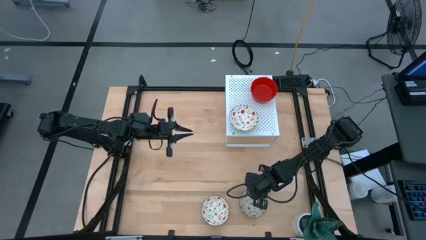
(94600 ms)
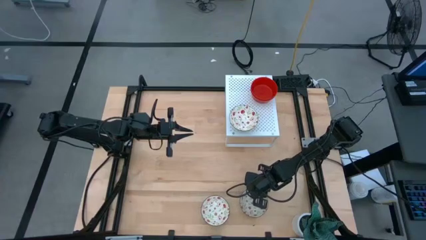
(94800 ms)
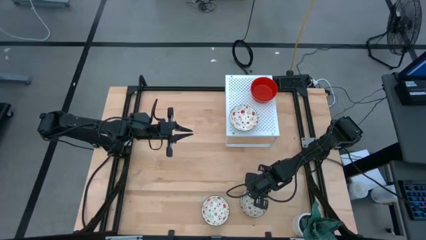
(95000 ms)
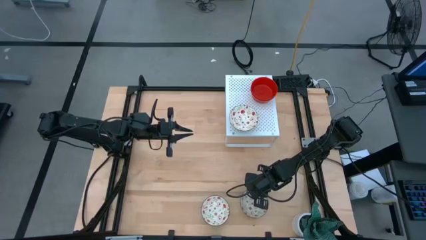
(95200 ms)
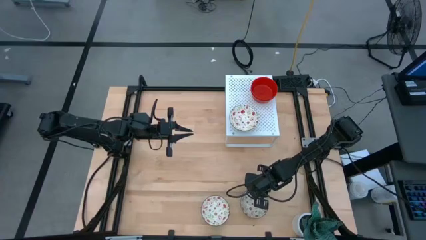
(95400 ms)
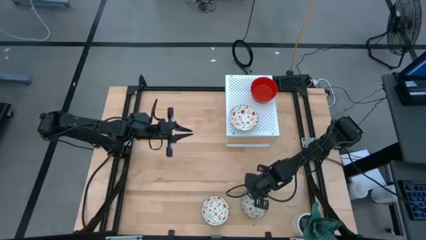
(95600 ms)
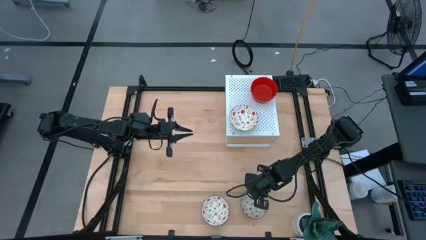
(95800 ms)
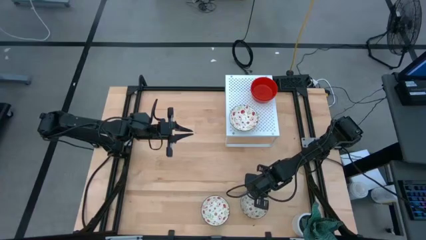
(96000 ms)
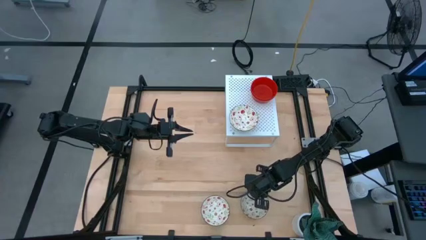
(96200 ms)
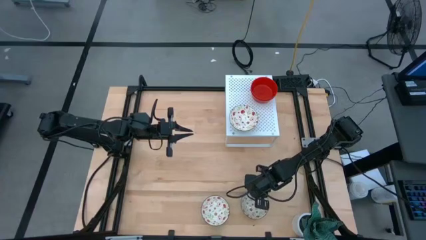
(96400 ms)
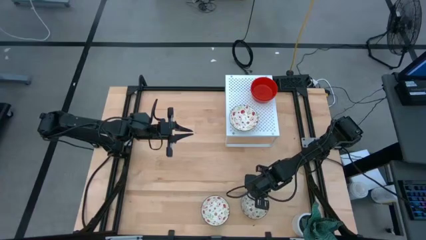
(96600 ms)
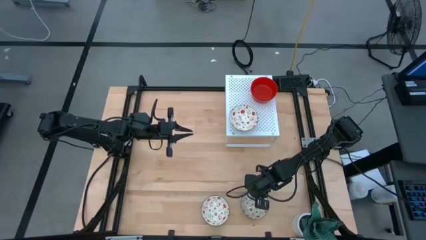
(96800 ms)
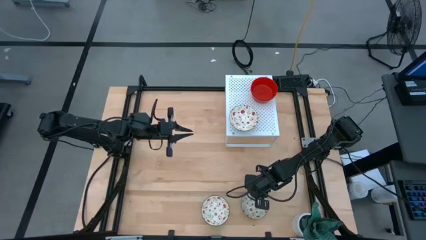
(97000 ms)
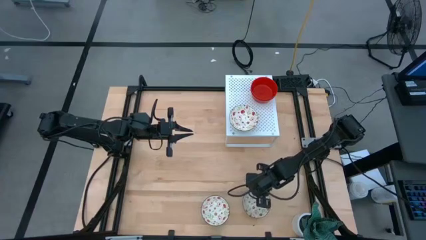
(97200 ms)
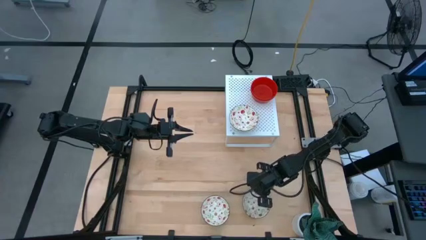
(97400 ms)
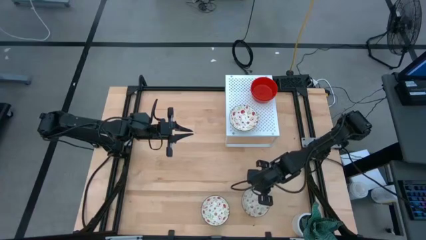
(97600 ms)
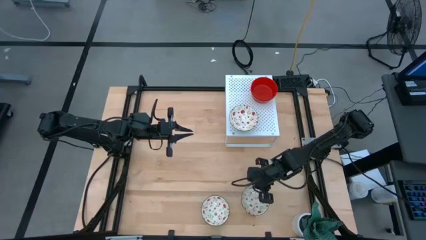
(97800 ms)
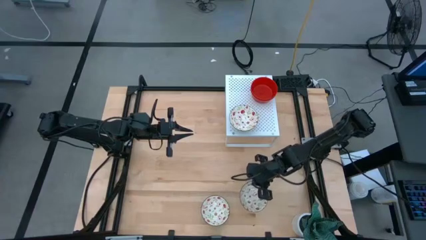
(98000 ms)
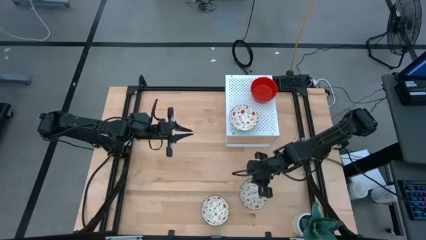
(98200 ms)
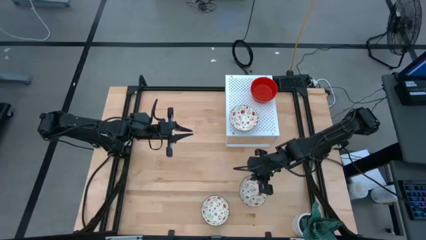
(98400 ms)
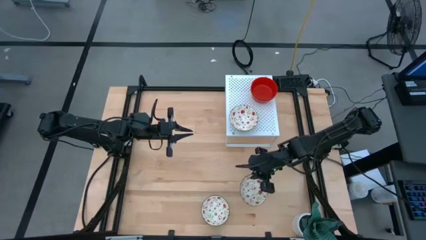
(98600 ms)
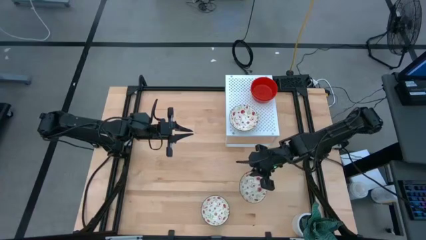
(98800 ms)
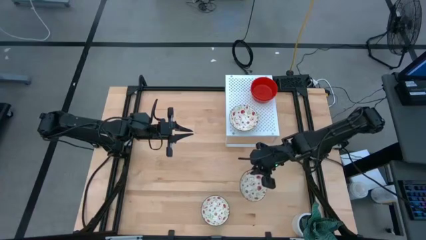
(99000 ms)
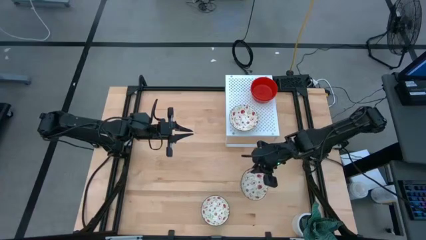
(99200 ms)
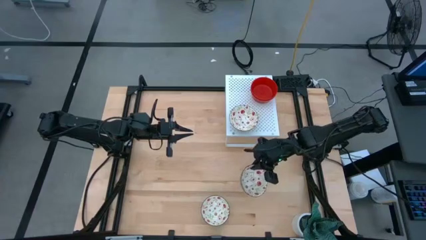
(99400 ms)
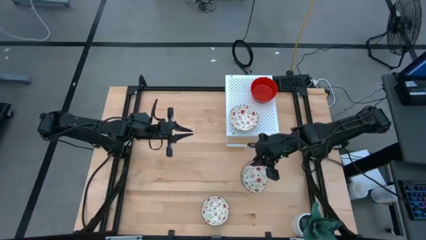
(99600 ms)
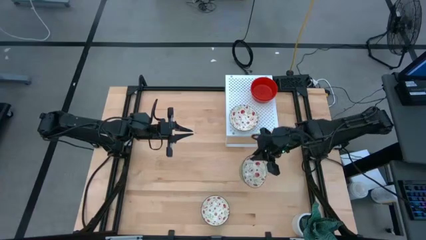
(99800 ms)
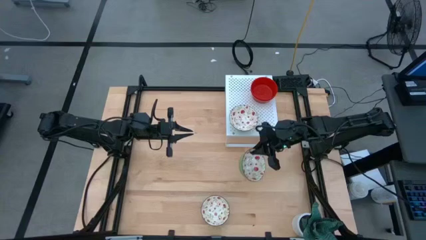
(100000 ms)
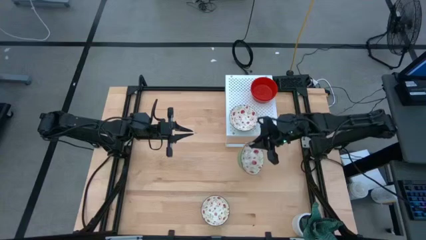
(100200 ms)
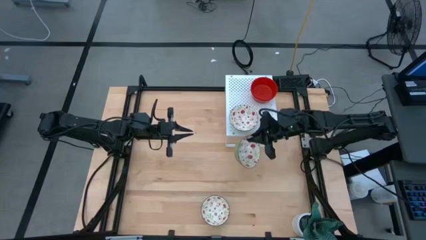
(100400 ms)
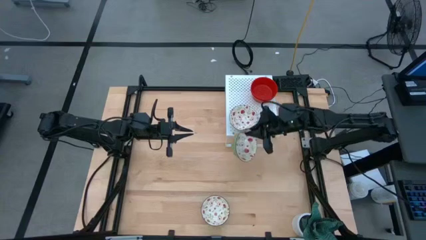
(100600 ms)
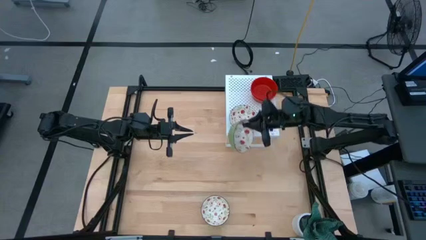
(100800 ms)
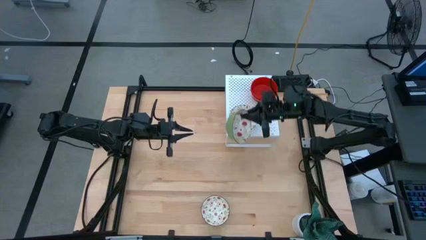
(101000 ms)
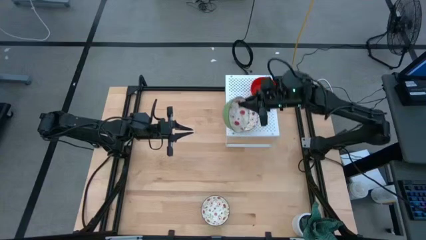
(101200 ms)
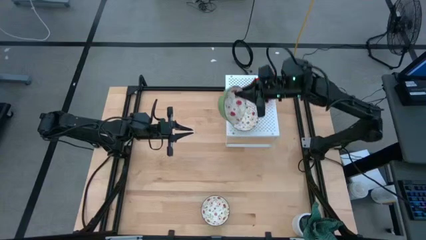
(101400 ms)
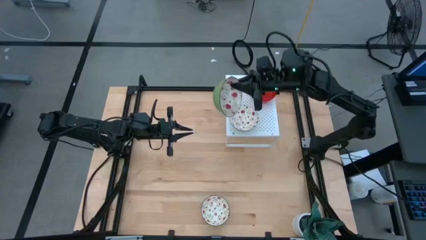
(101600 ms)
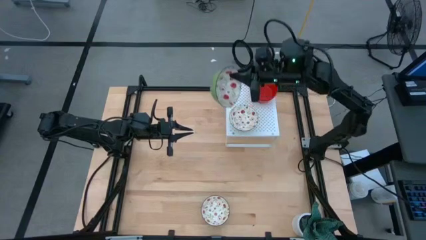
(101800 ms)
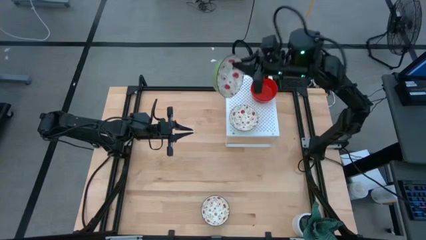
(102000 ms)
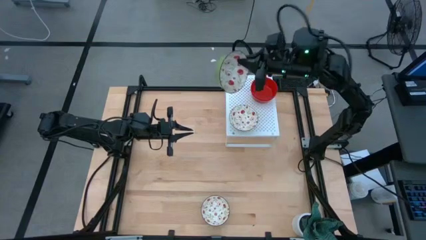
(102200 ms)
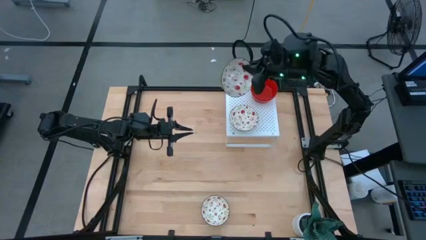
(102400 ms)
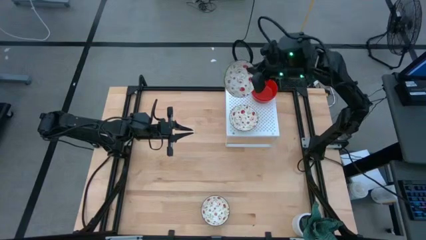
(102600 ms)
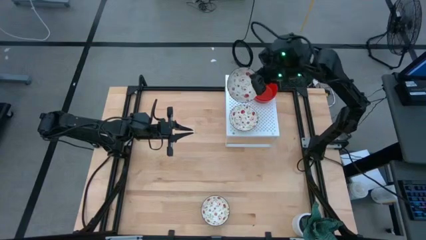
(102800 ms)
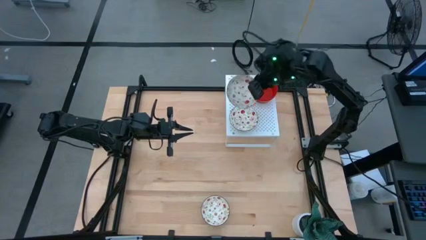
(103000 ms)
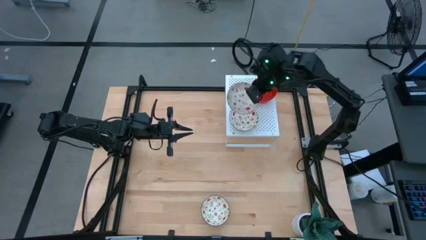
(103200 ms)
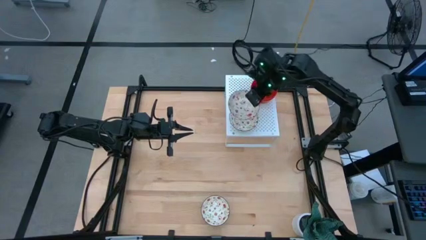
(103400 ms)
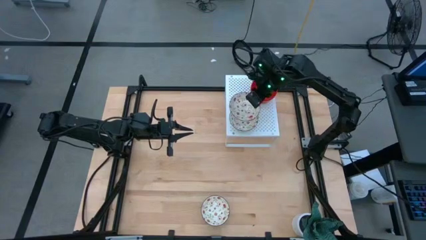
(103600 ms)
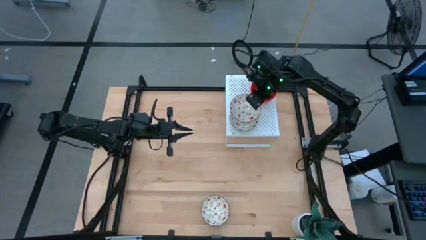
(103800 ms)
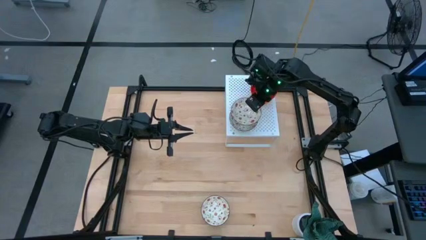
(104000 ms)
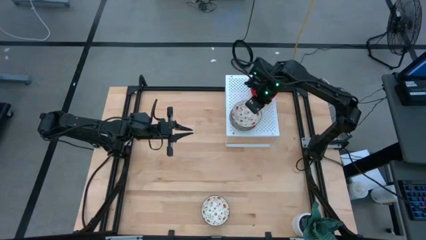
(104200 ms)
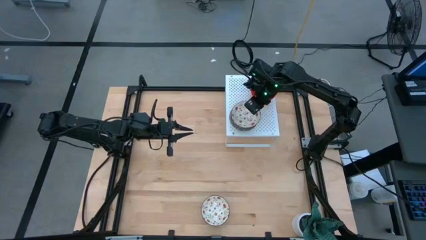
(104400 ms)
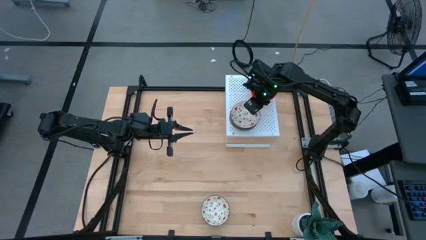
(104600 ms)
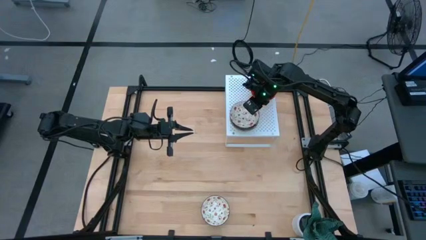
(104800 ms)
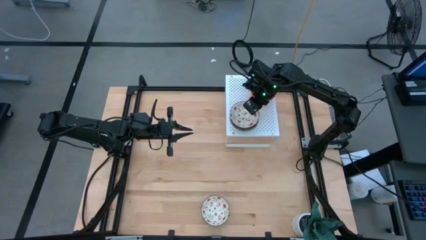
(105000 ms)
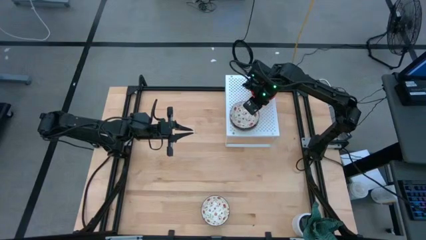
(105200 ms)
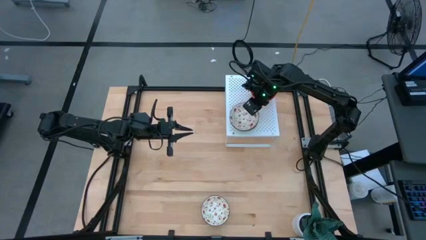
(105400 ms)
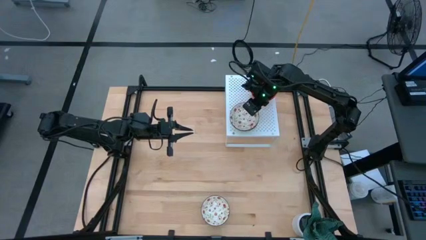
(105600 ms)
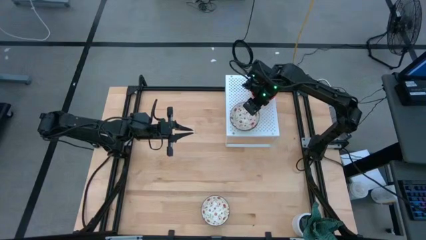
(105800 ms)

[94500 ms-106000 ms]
Task: Pick & Place Mini bowls
Stack the right green bowl on the green bowl on the shelf
